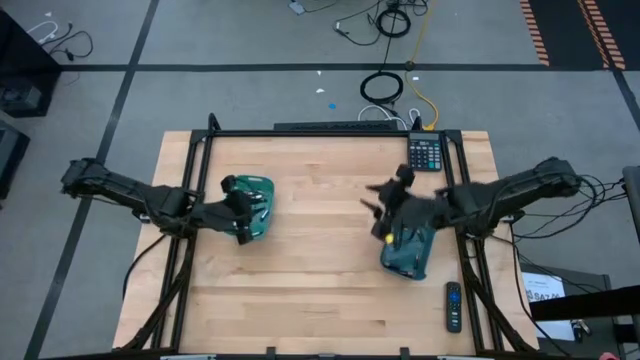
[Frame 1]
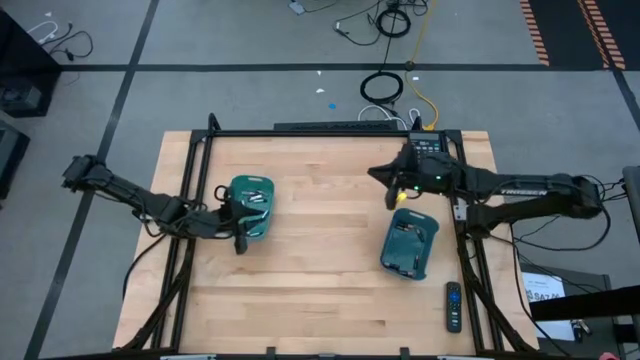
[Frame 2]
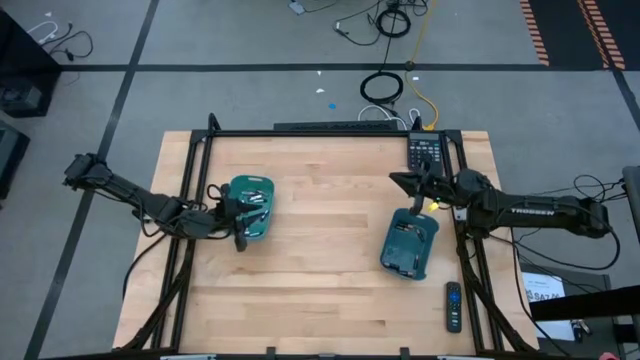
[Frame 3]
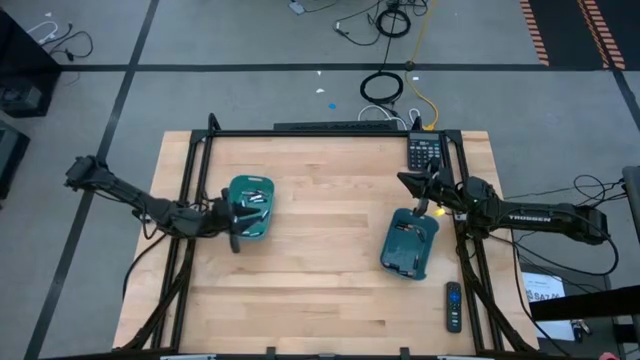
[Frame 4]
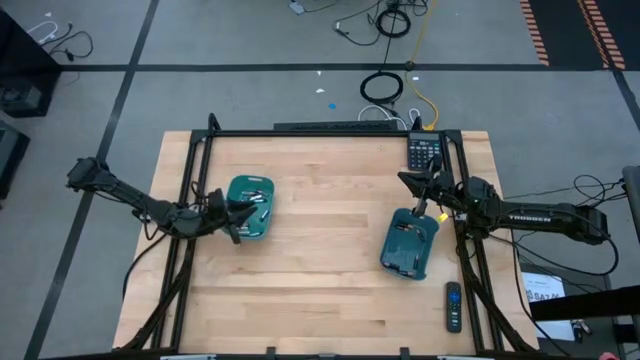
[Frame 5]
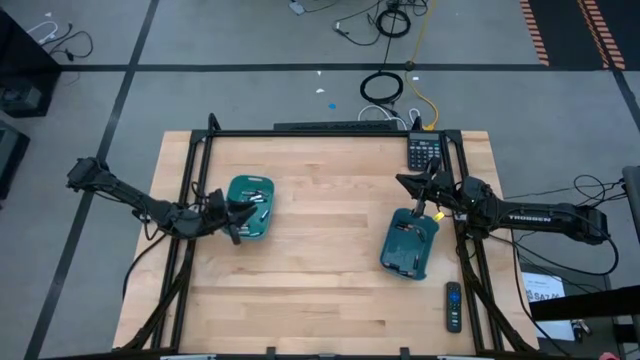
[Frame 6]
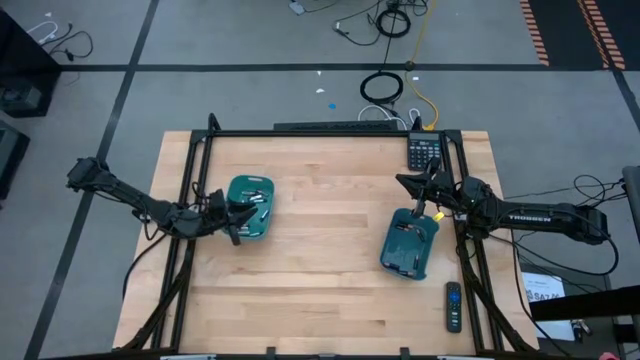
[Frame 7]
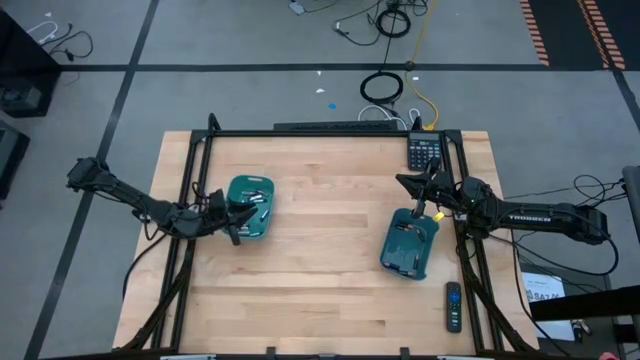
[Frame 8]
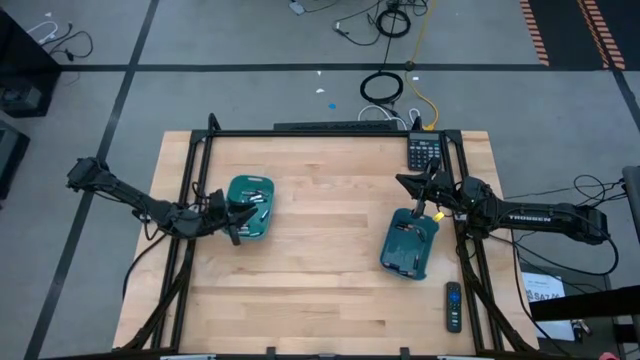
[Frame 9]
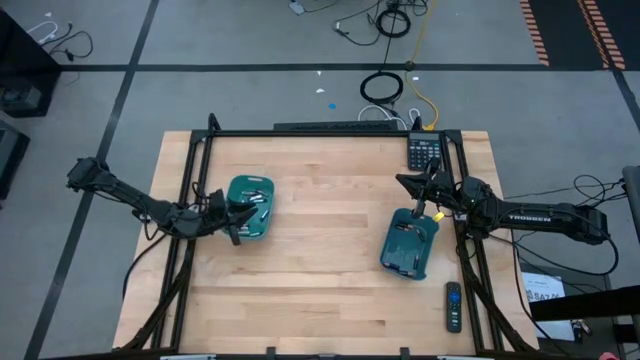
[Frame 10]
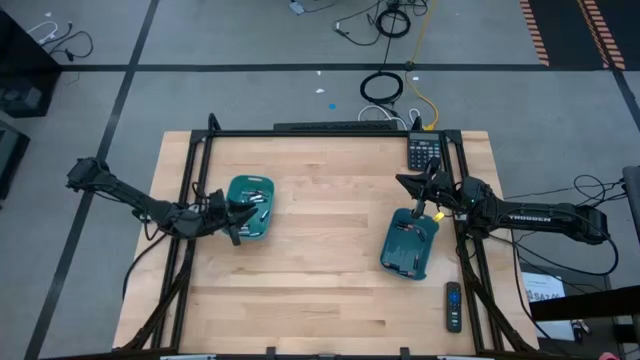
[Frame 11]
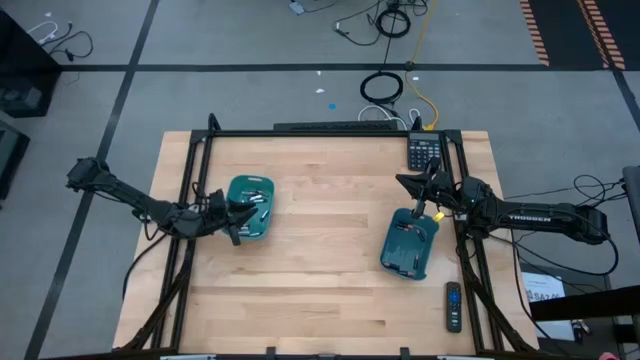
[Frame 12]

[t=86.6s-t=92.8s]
Task: Sort batteries
Return to Home Position

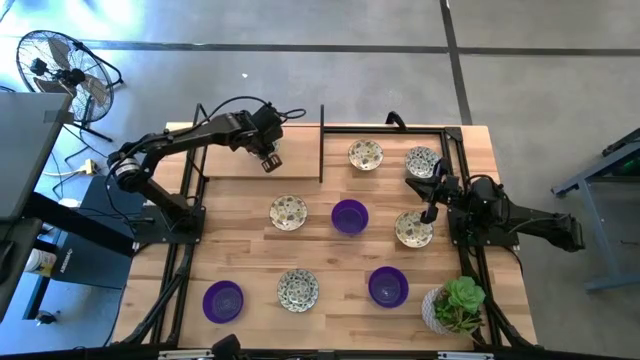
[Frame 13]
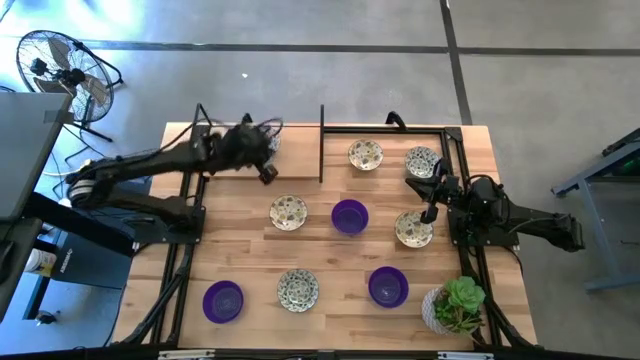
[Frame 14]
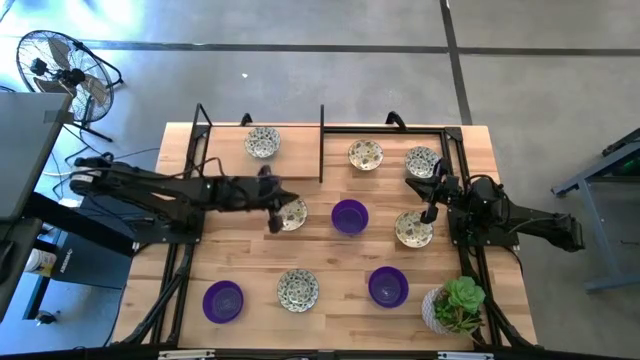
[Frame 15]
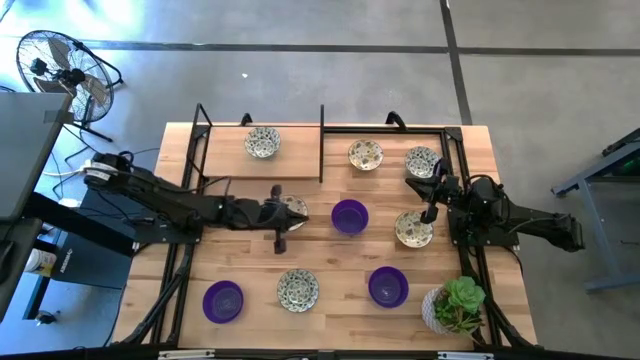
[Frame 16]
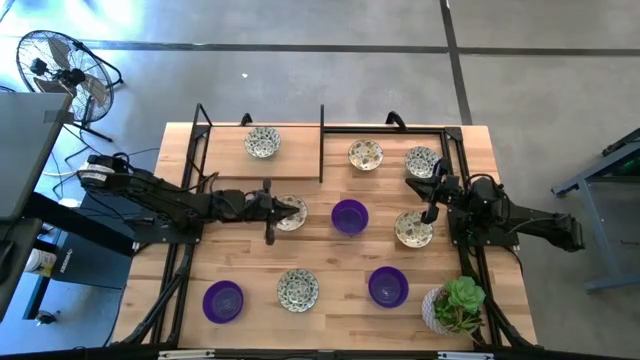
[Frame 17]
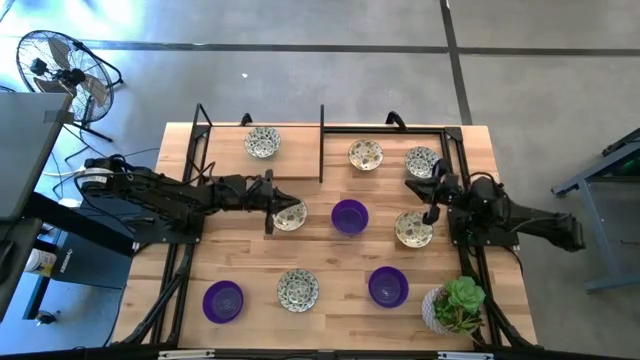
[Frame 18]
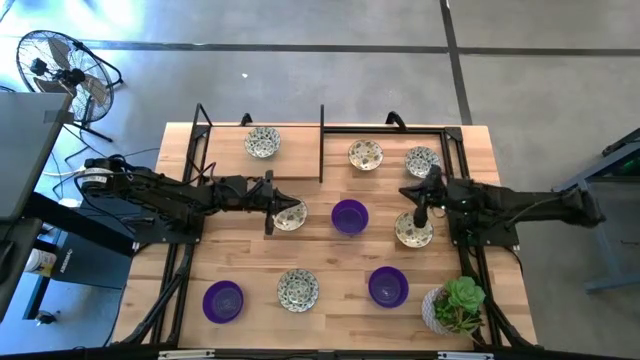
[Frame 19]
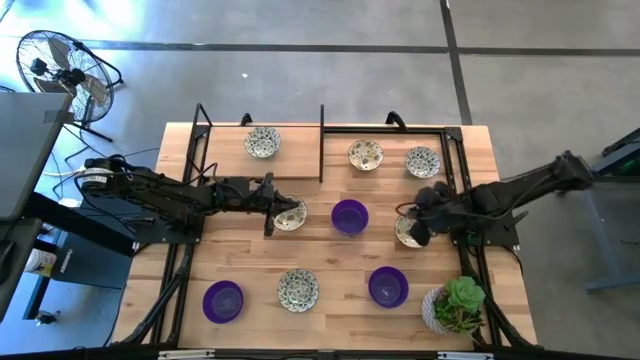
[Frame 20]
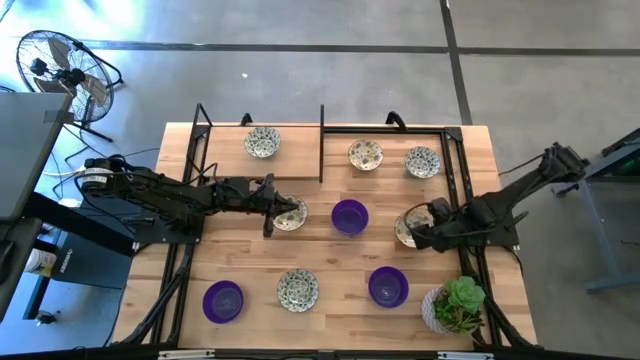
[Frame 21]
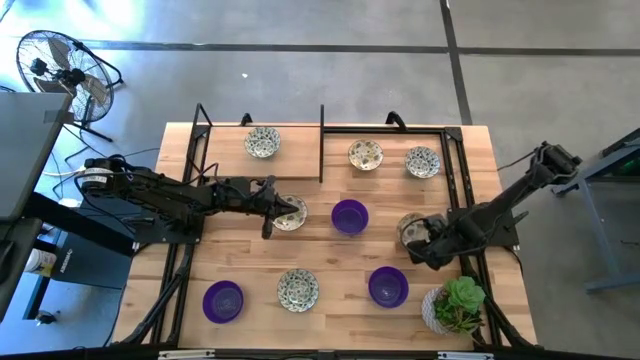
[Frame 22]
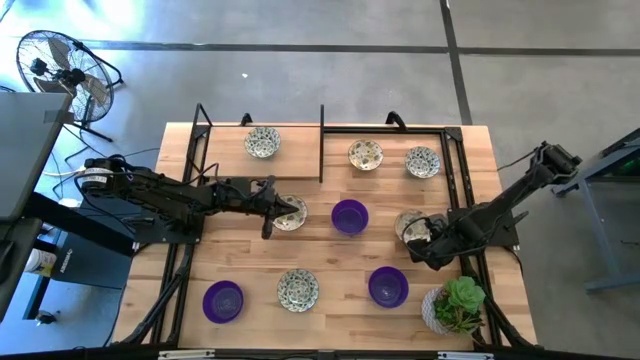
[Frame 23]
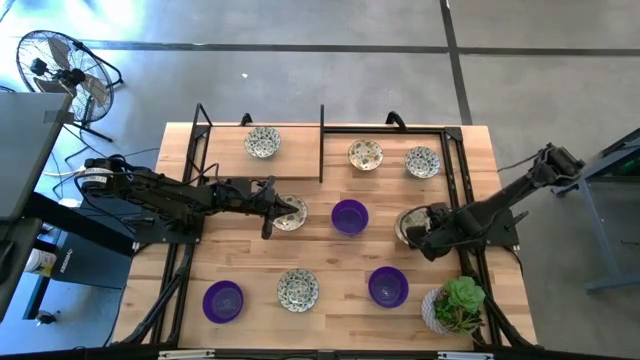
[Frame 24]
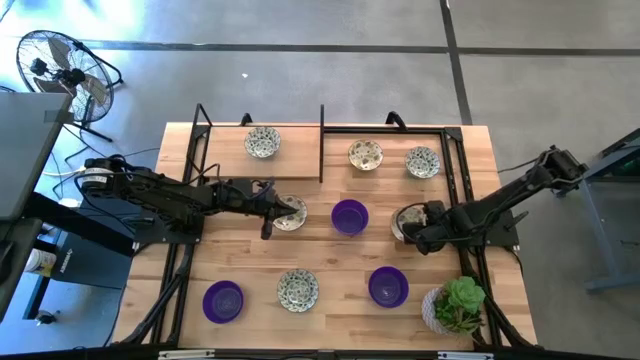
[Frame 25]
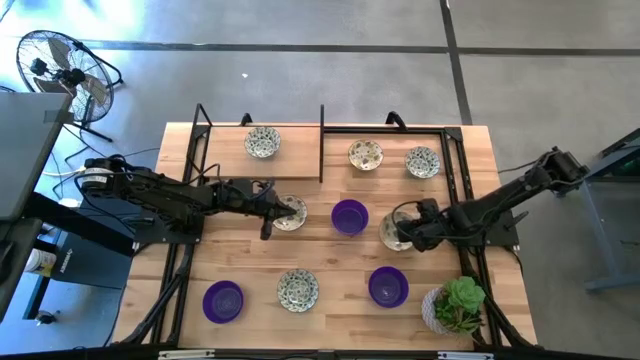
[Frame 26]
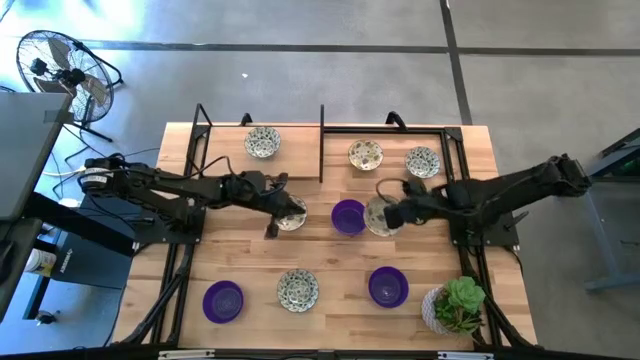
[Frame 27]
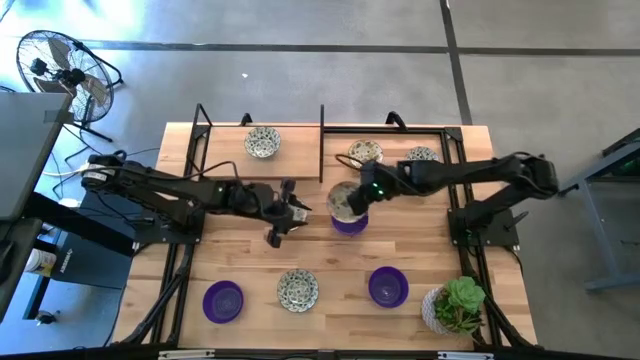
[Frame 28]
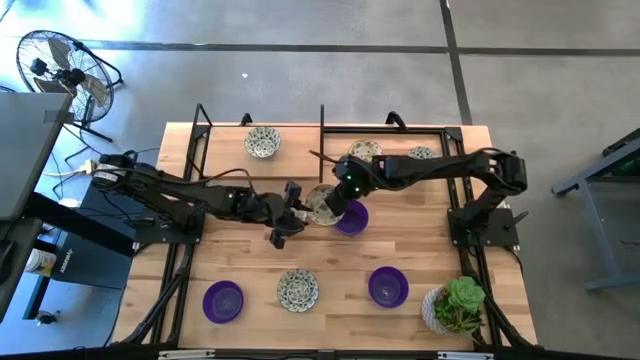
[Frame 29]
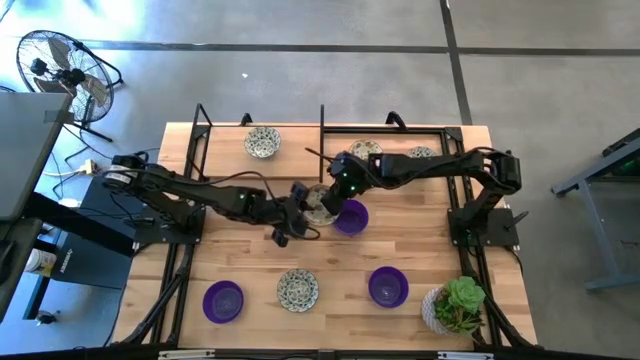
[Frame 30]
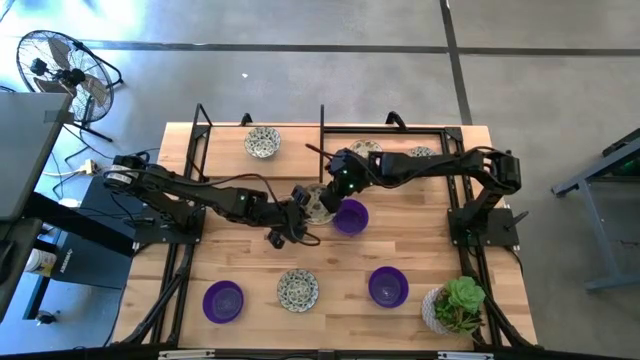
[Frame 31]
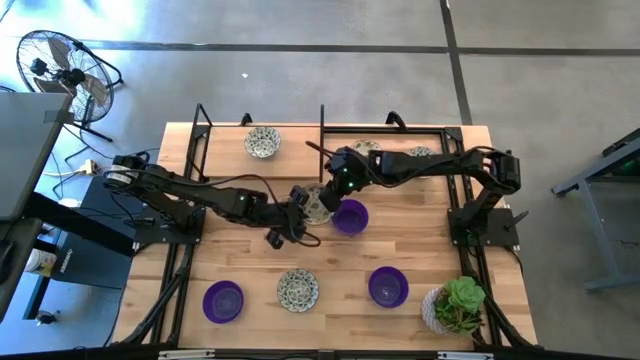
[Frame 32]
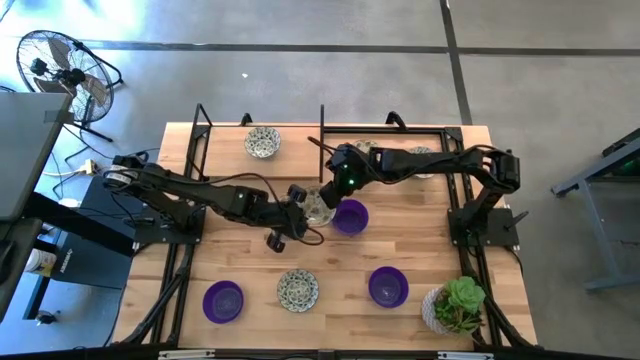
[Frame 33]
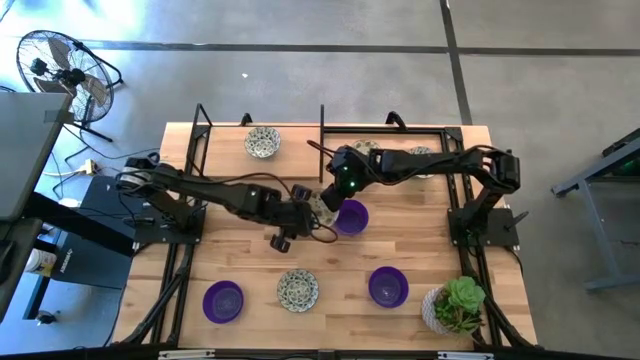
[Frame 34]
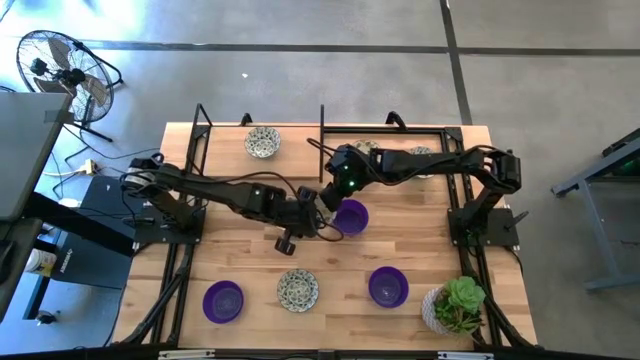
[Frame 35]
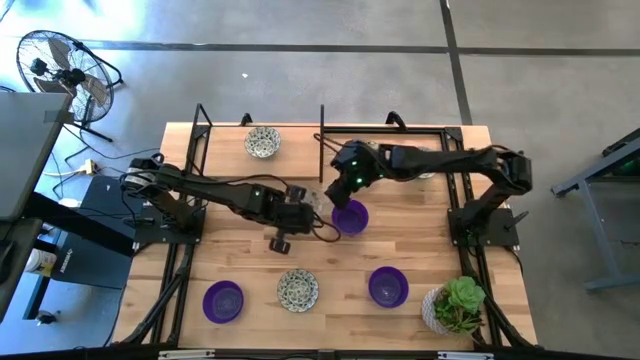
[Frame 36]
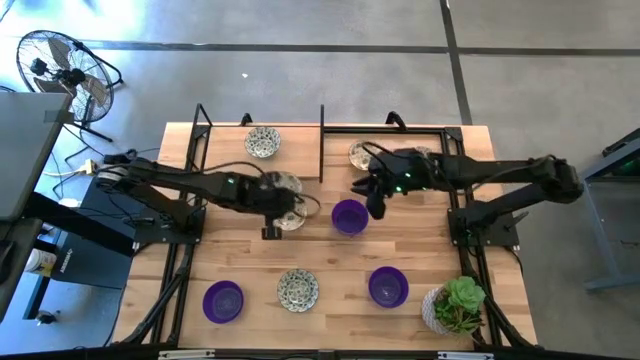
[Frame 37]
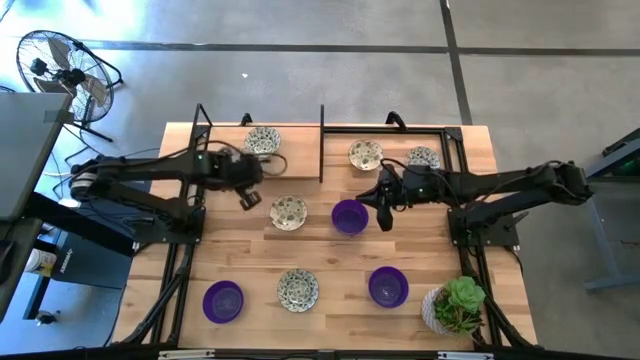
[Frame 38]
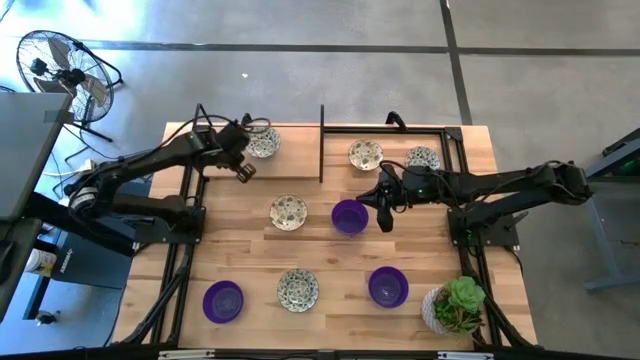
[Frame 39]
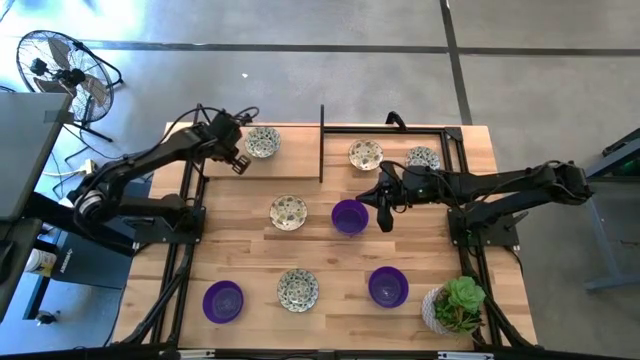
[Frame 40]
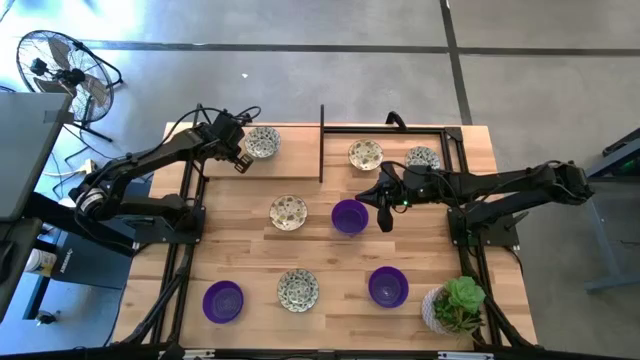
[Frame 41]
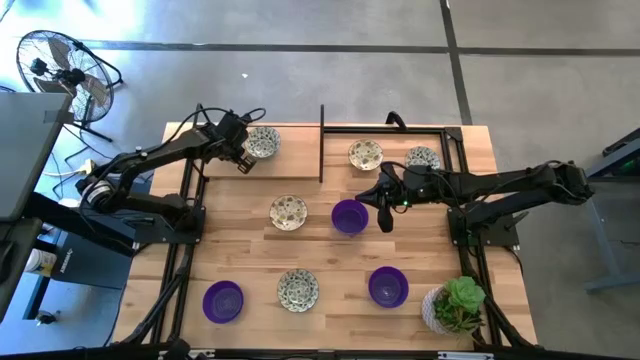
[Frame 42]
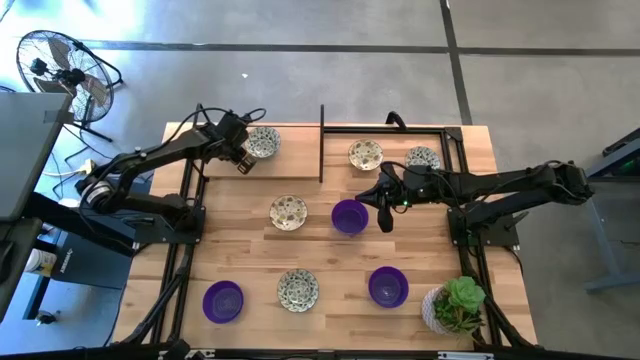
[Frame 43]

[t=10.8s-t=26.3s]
Task: Pick & Place Mini bowls
Put the bottom right yellow bowl on the shelf
